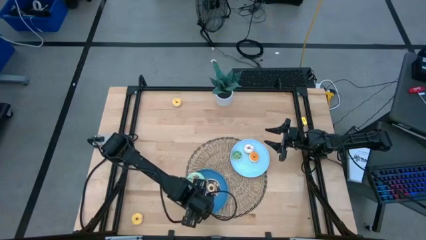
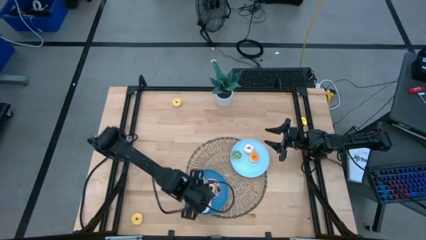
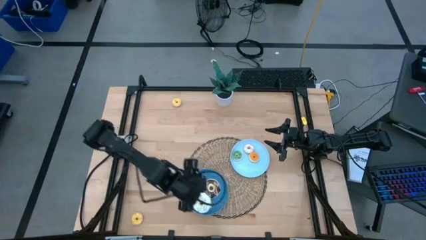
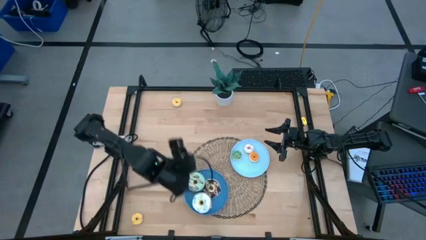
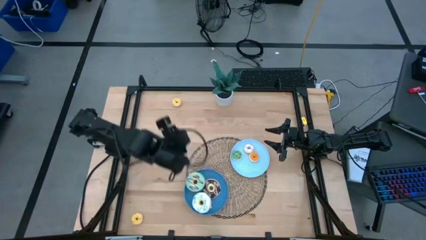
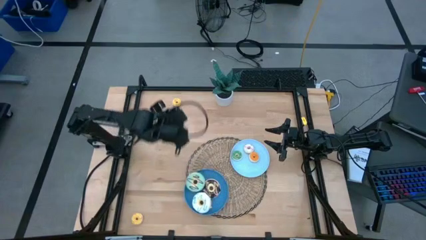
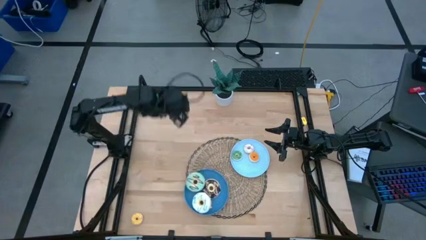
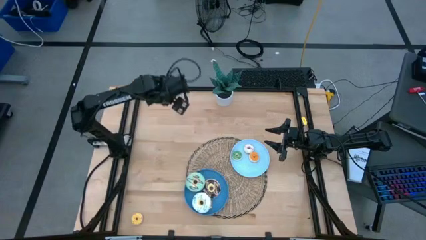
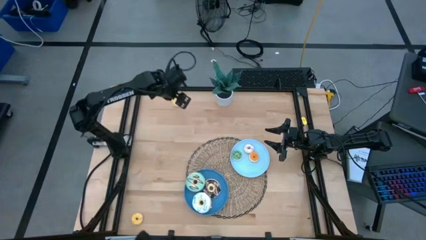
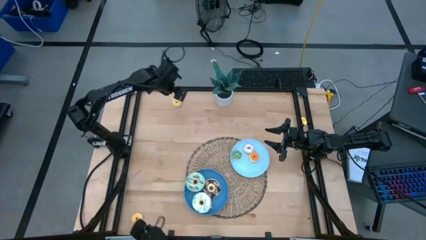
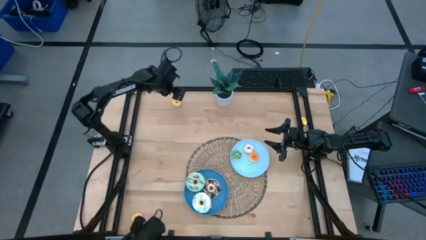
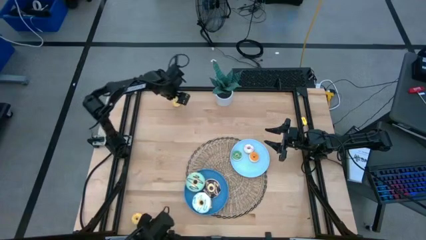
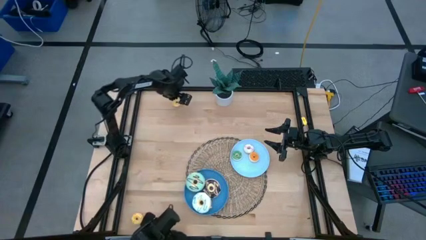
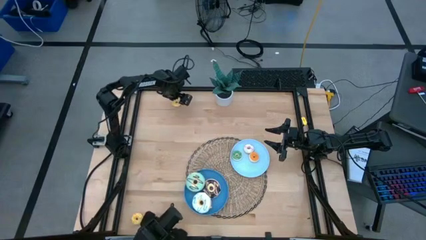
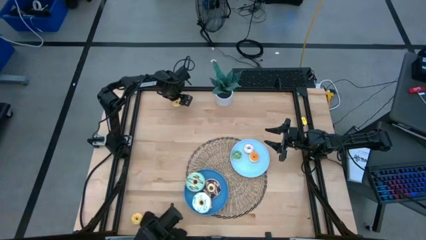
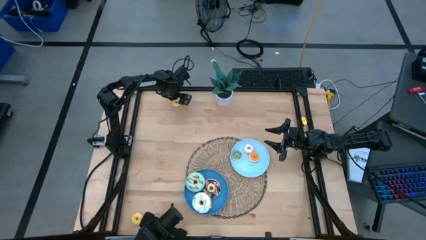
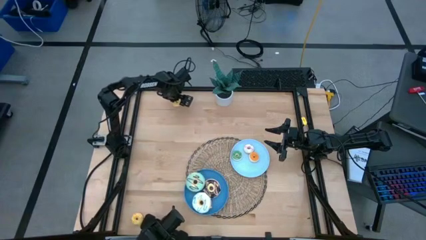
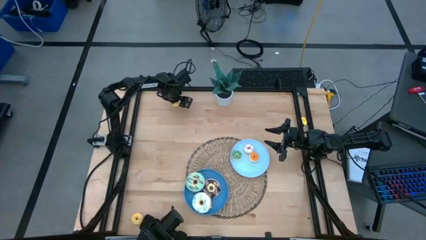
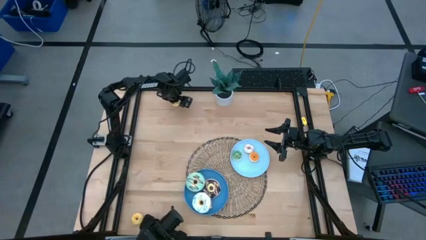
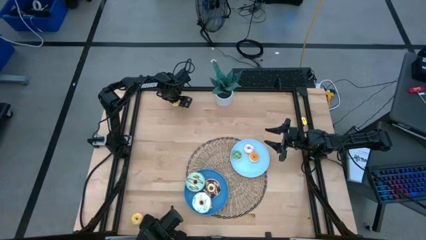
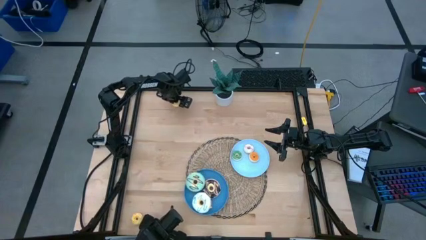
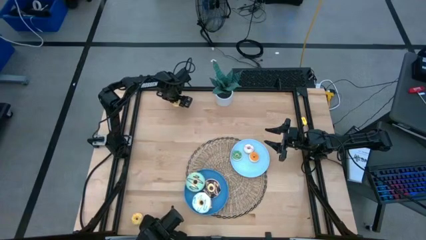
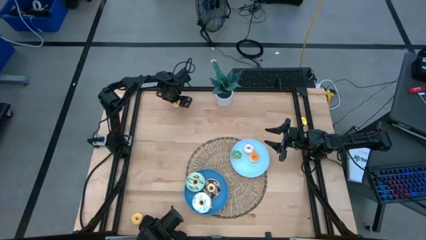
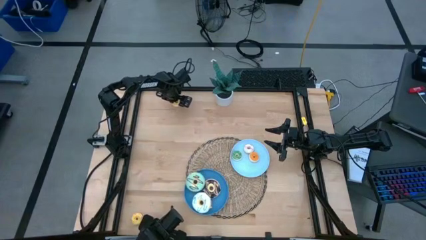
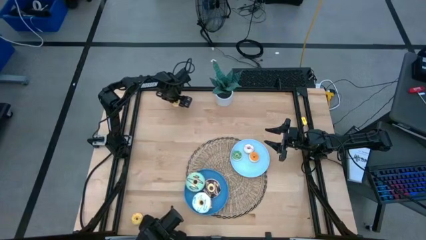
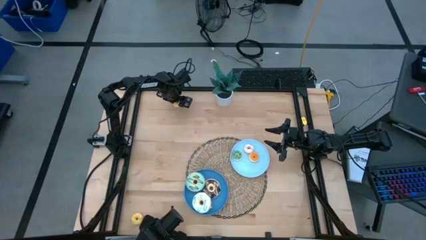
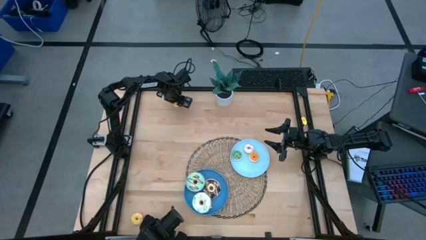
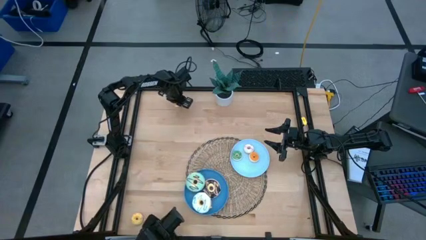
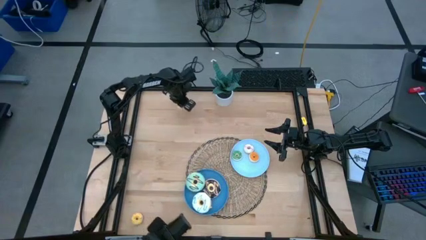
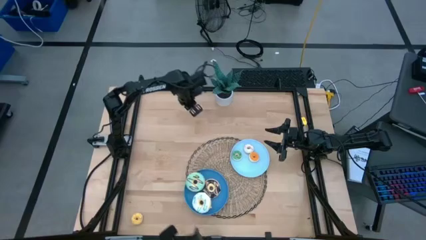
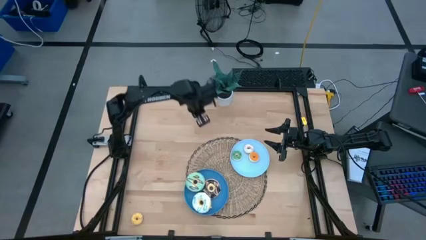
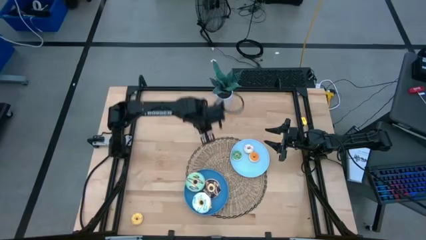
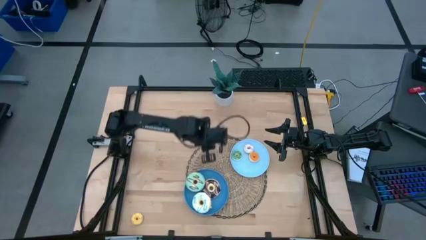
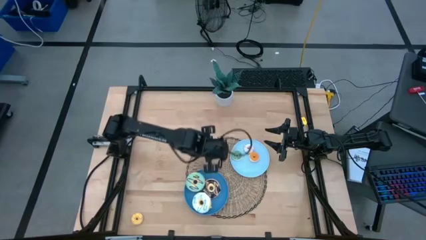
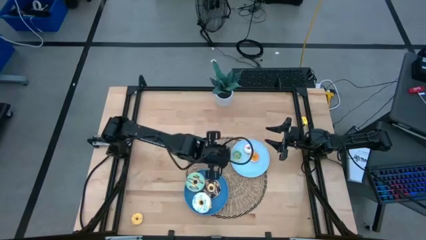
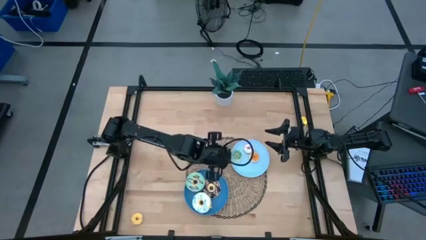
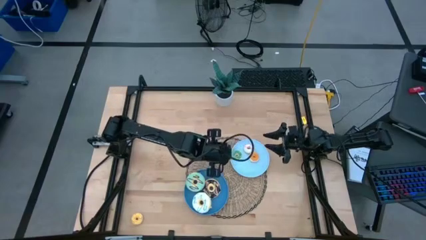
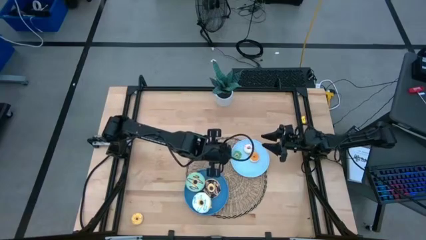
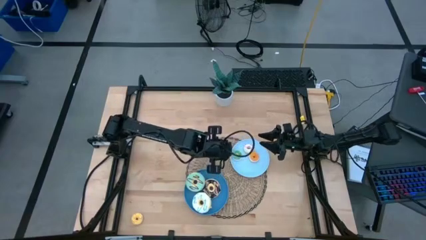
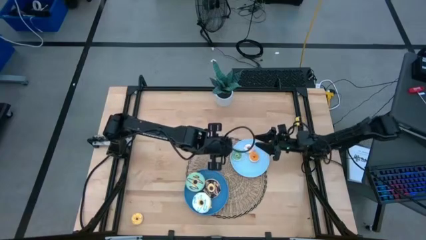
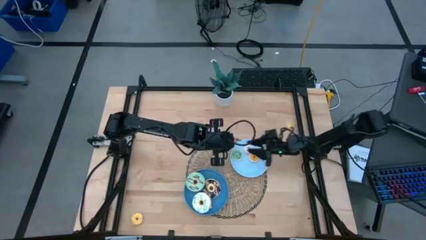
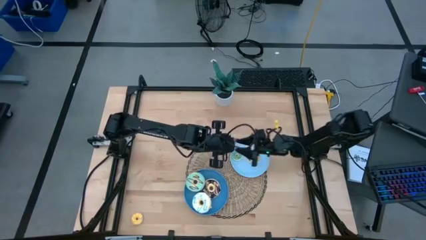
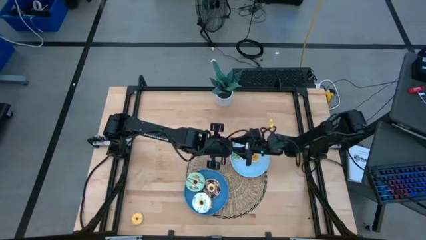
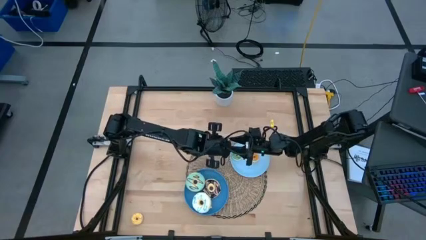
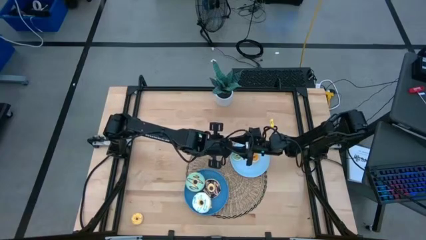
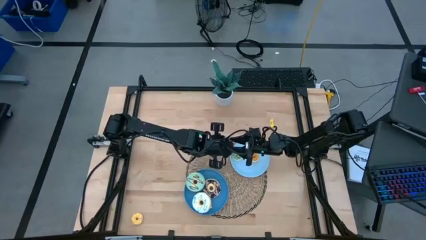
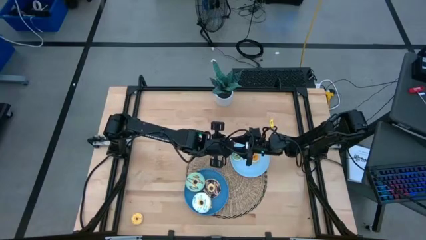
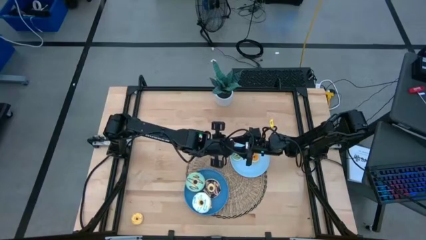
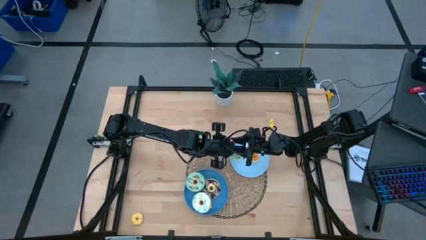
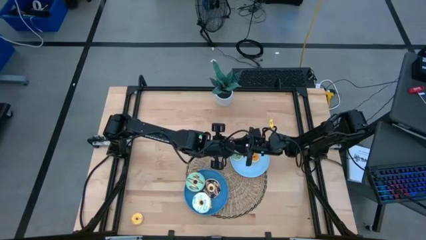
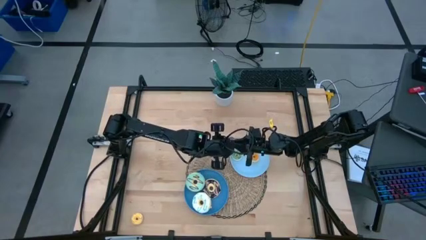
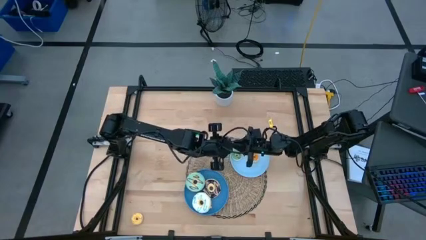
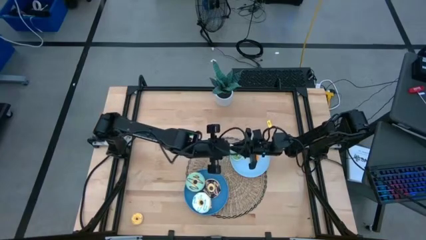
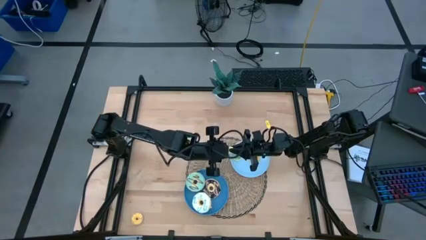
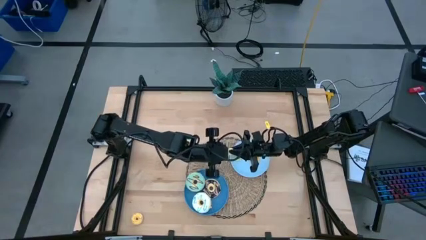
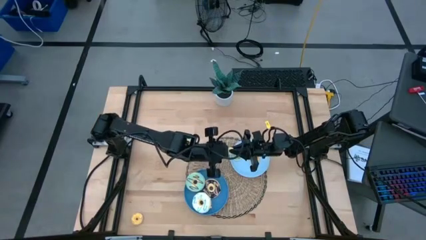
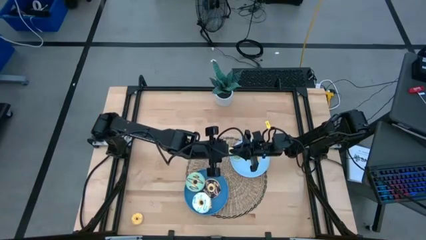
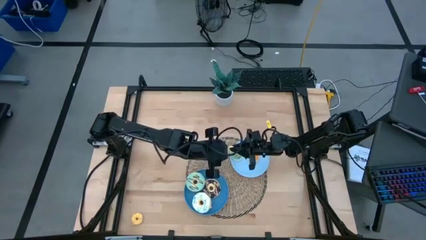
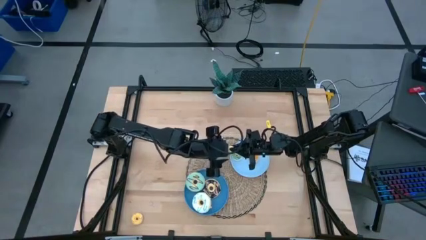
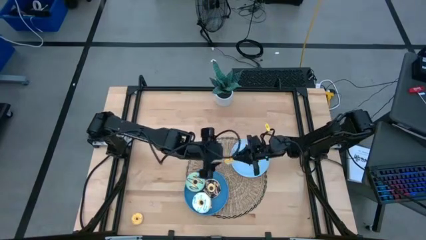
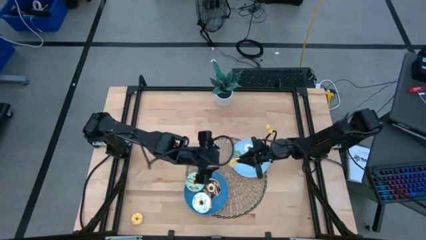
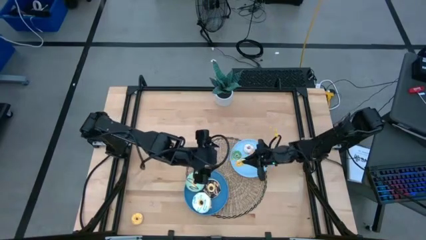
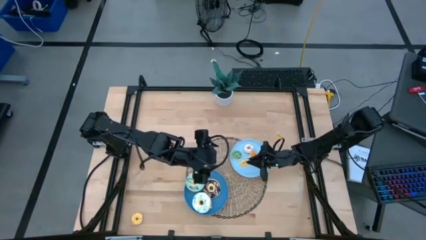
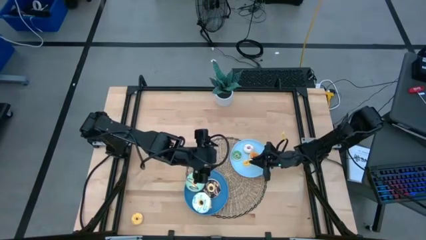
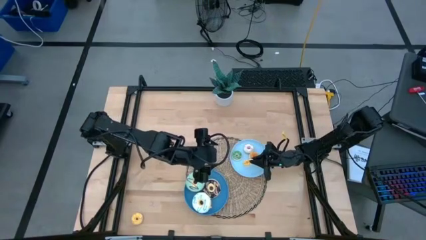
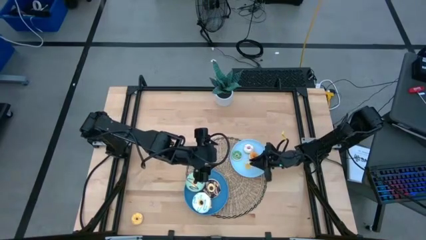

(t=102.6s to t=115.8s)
Task: Pick & Place donuts
Put the top small yellow donut on the light blue plate

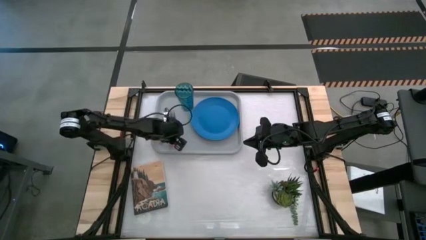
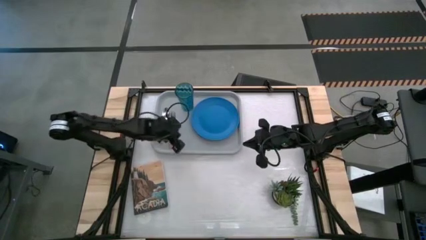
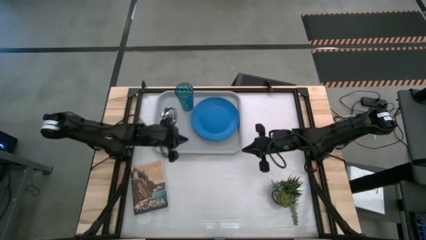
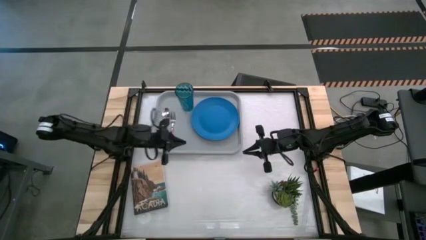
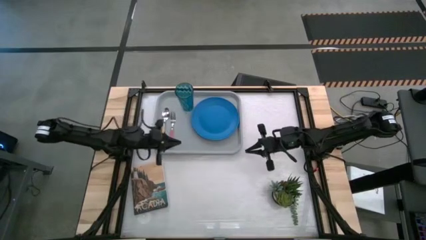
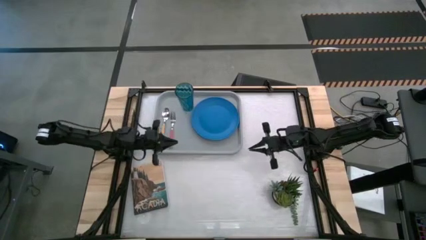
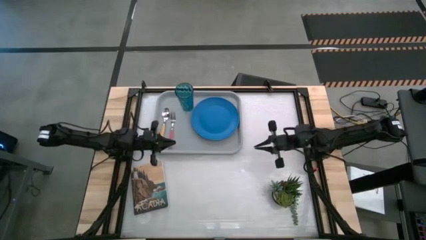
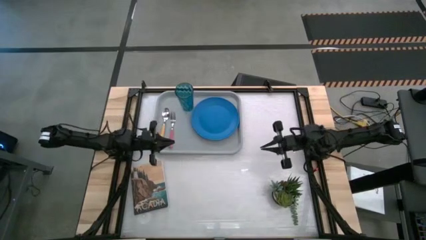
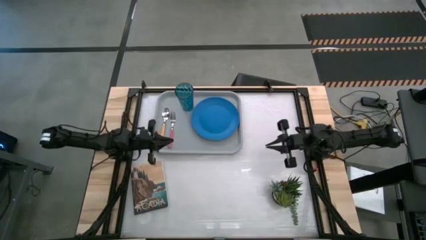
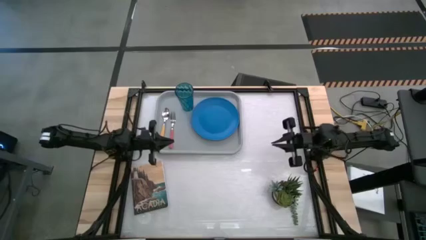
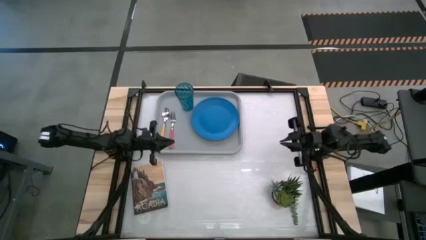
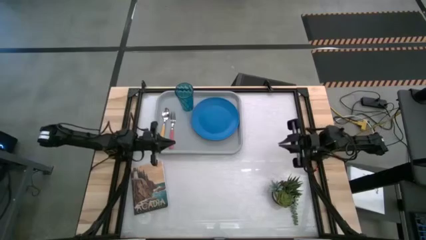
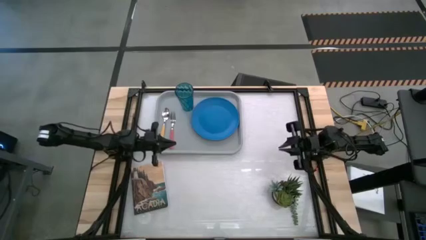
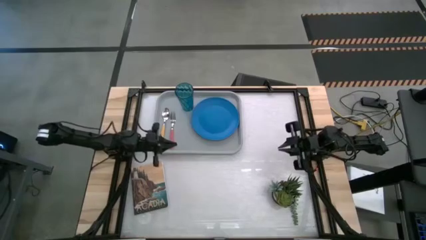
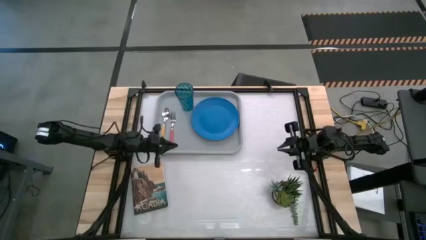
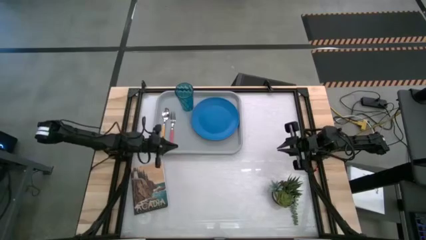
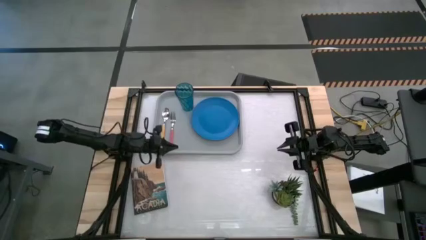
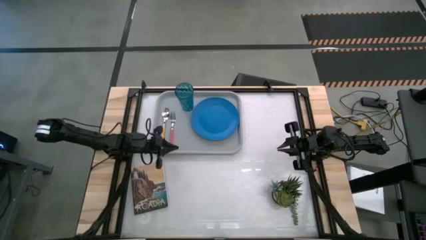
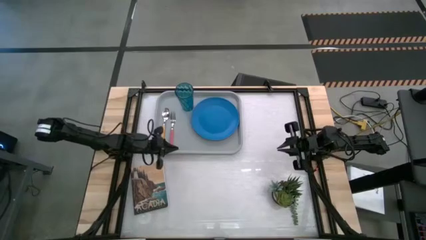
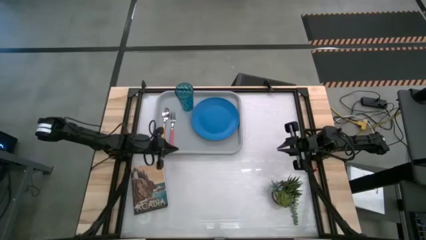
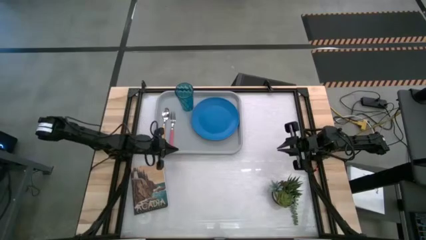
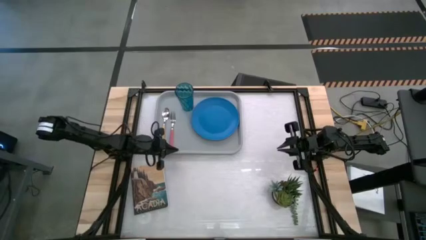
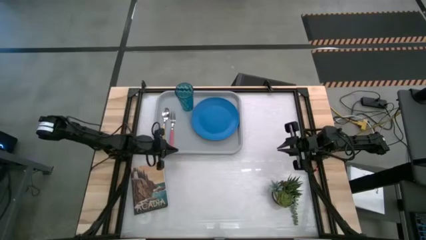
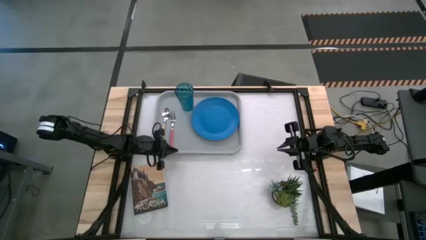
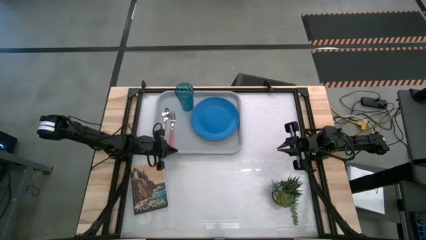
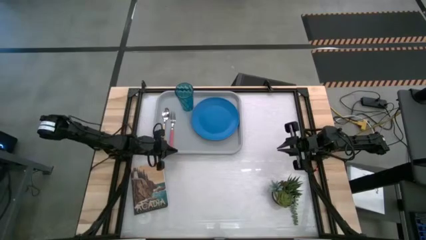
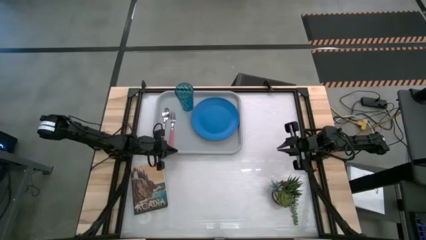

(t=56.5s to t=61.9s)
Task: Pick and place plate/cup/fork/spoon on tray
Return to Home Position
